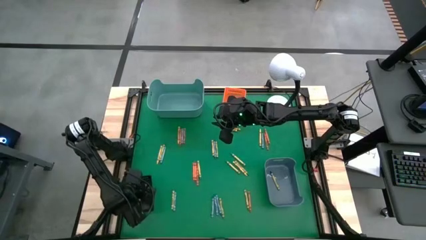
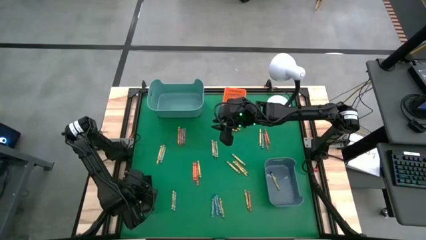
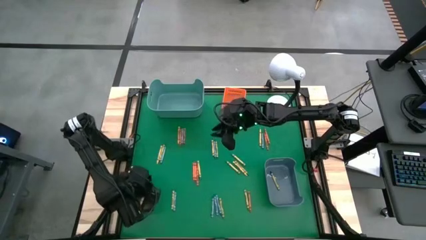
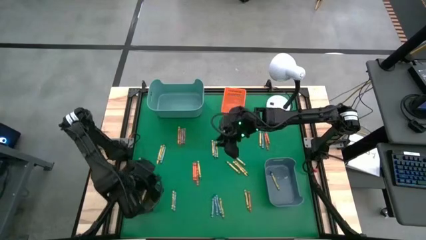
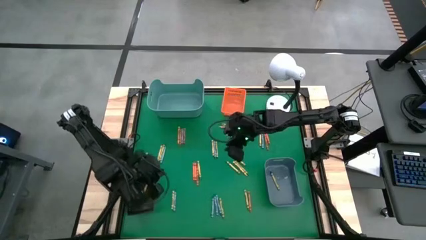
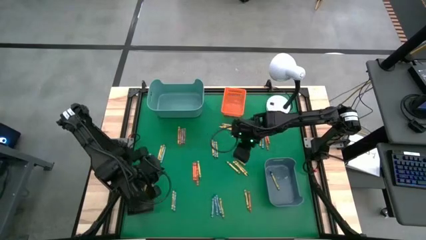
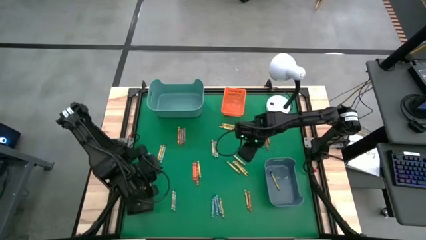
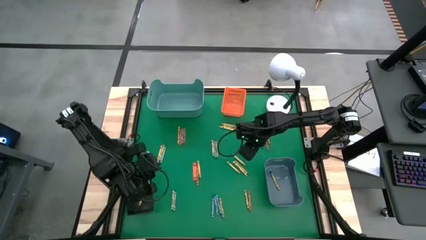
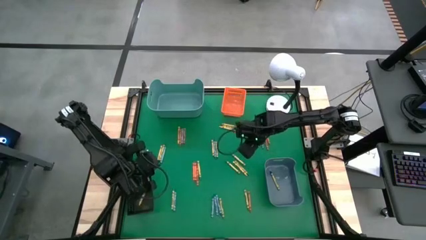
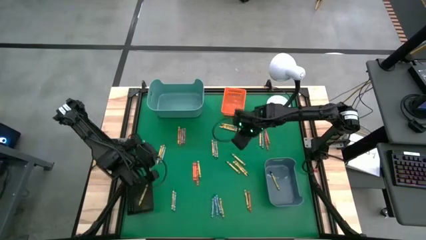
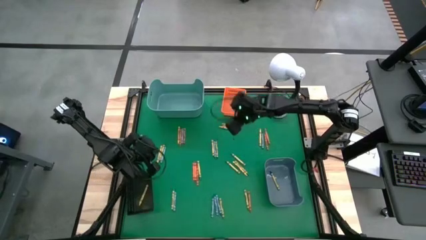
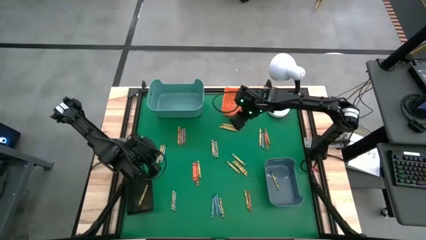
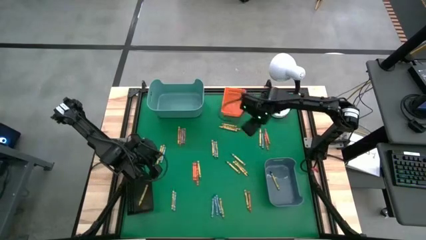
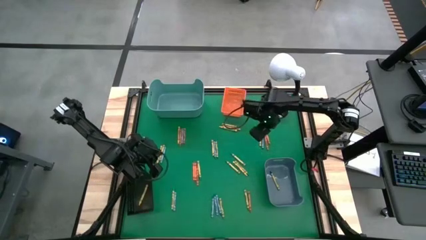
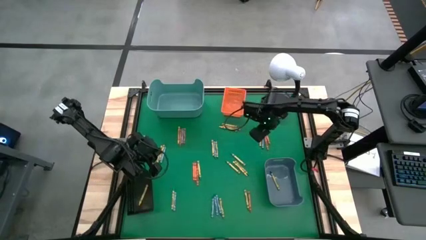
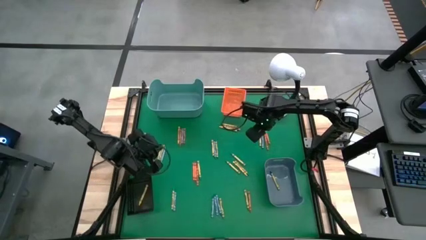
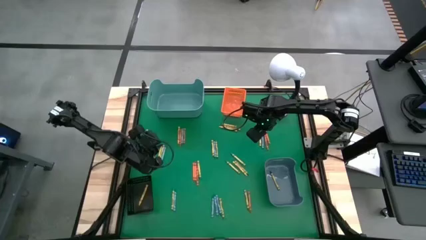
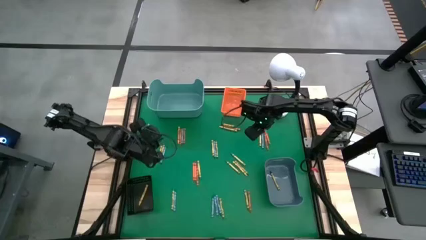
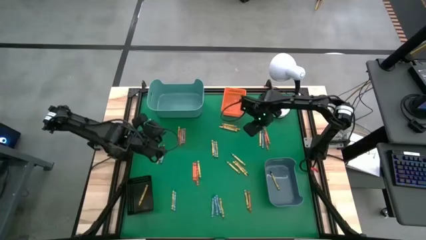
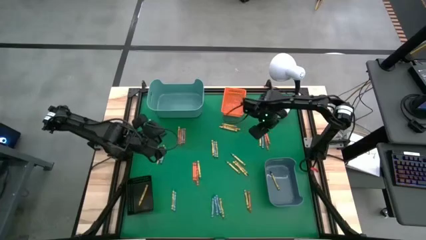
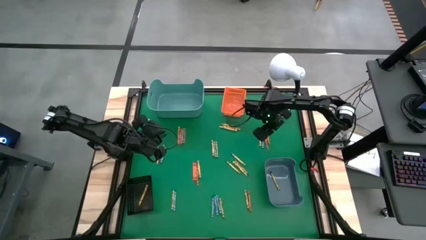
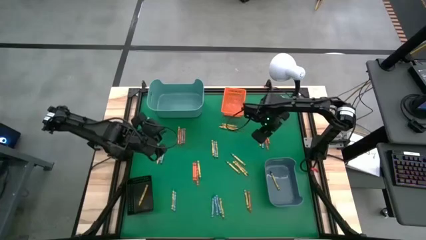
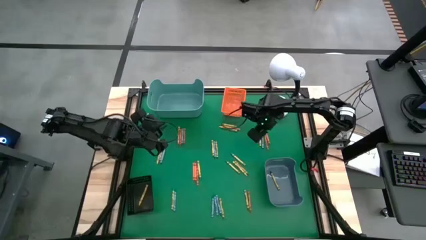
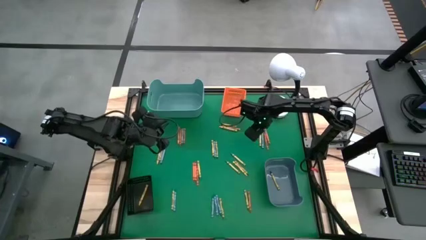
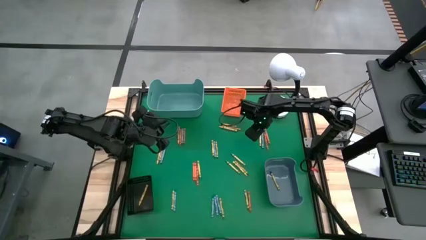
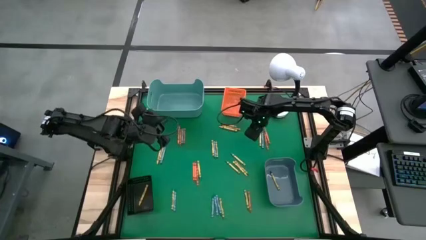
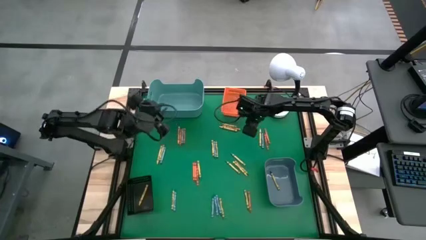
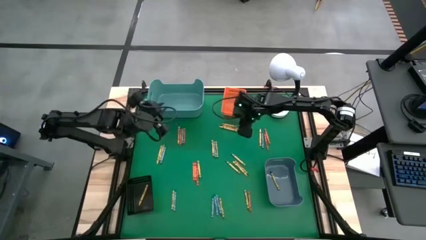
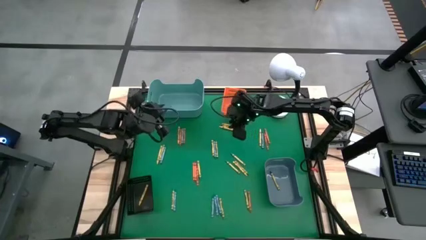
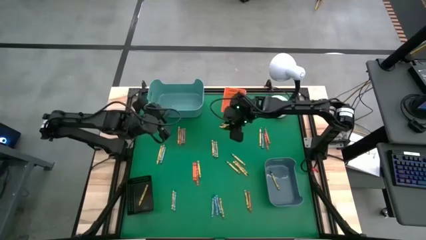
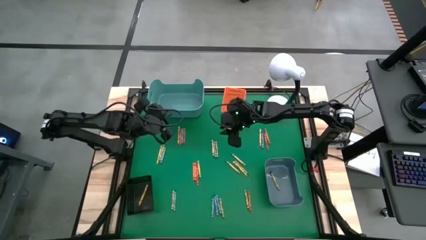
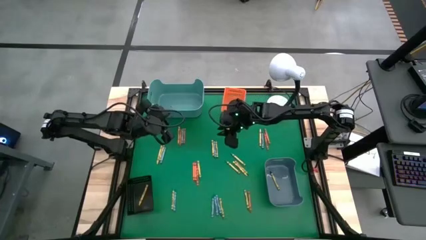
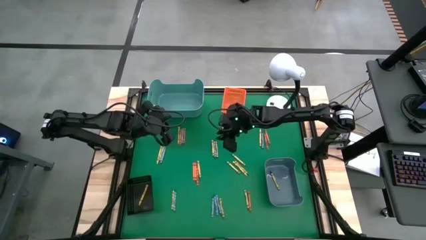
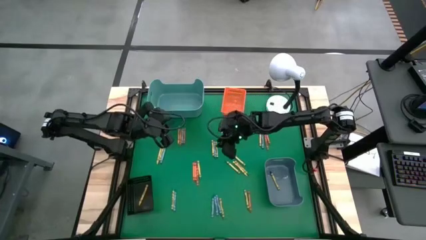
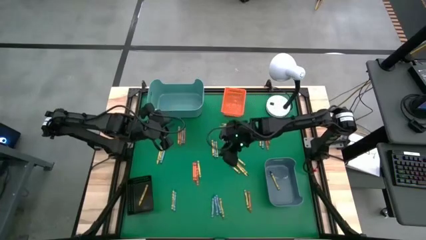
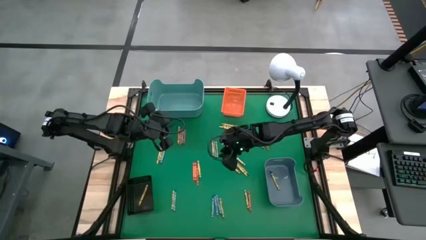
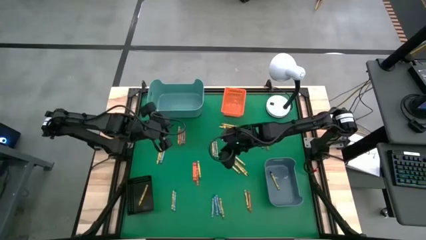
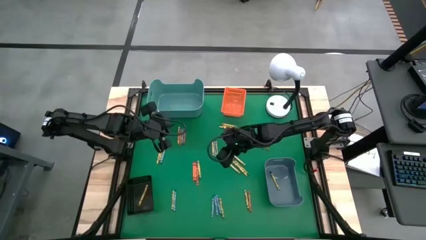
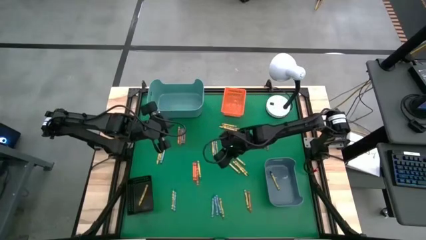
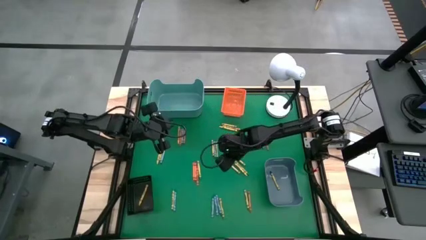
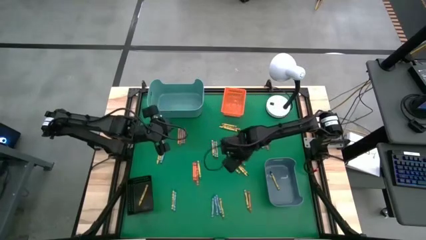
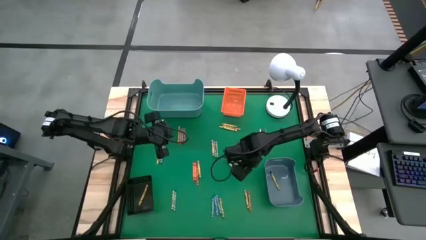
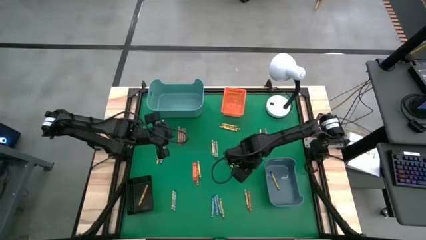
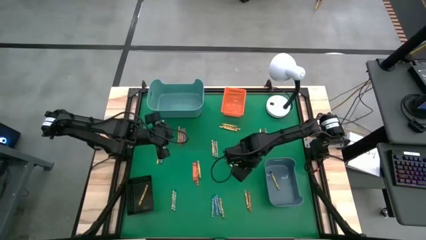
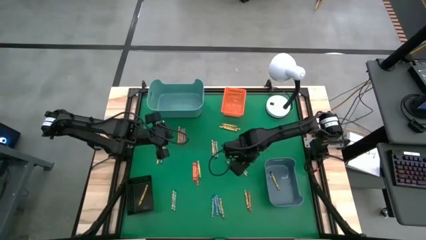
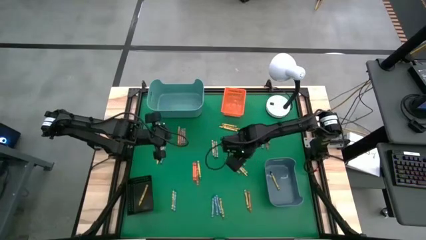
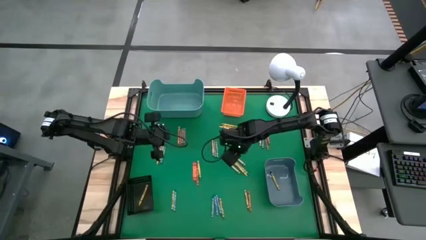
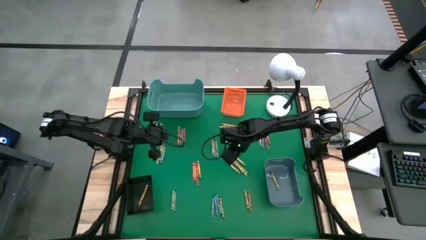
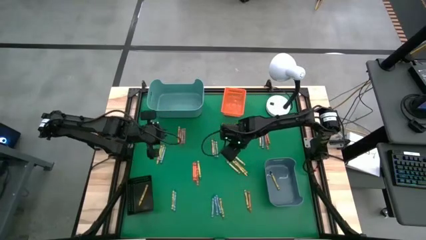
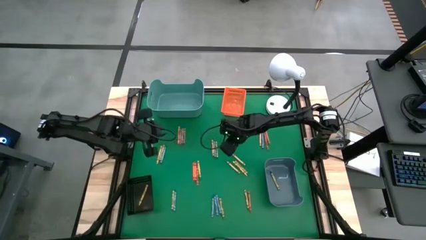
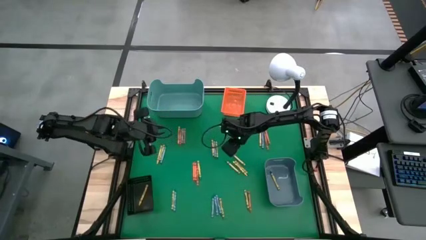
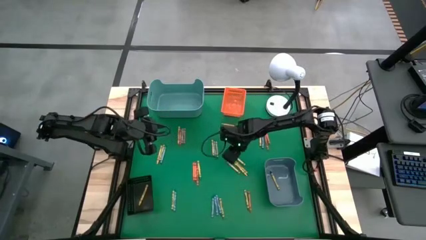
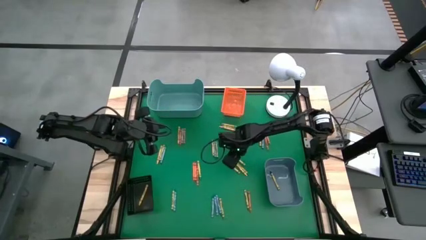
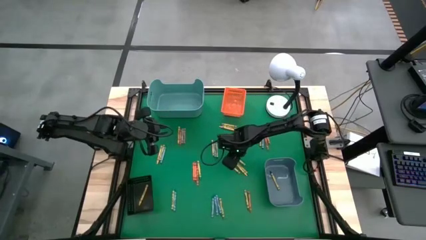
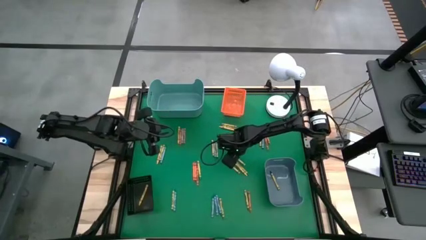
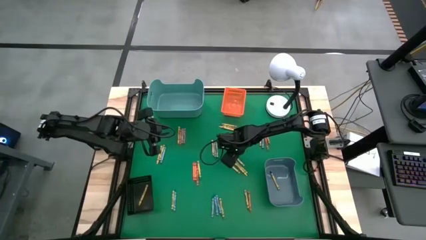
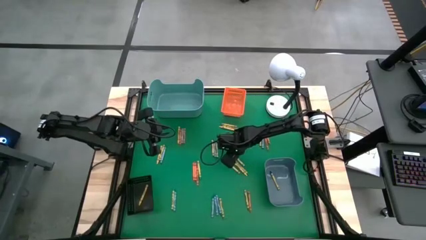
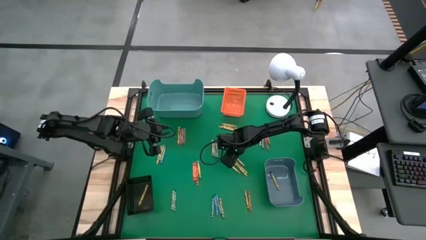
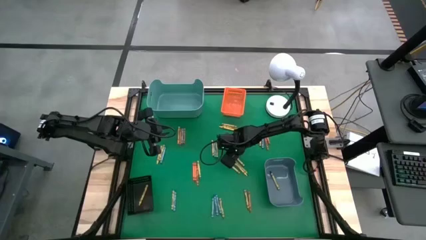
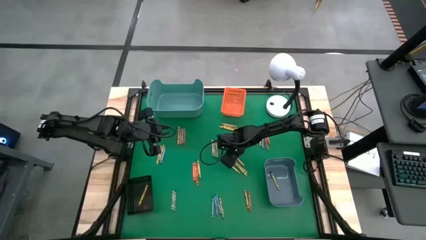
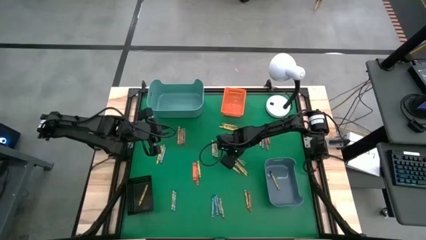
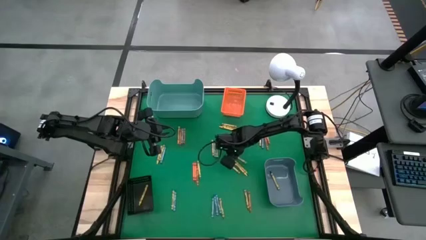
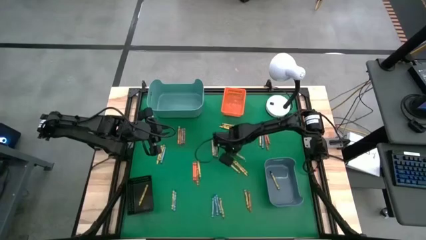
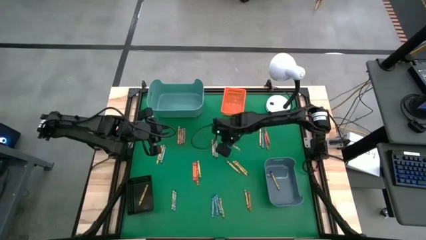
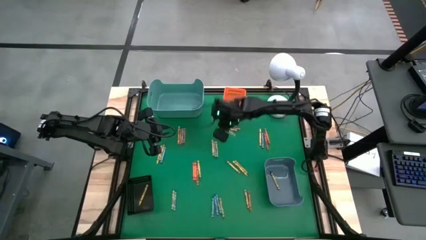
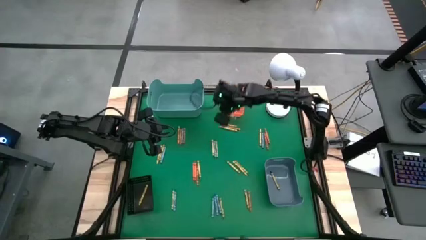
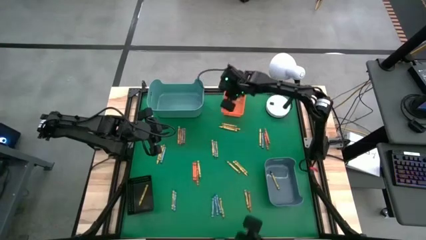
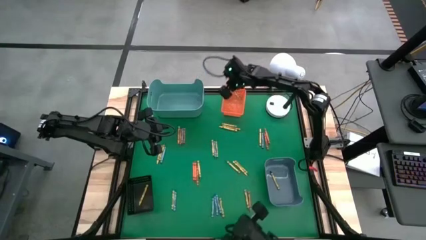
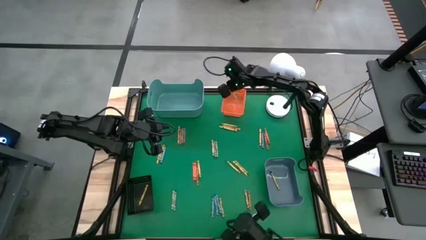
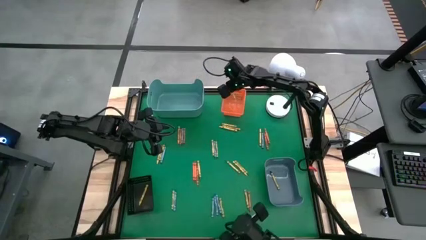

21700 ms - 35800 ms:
Task: Sort crayons
Put the green crayon into the blue bin
